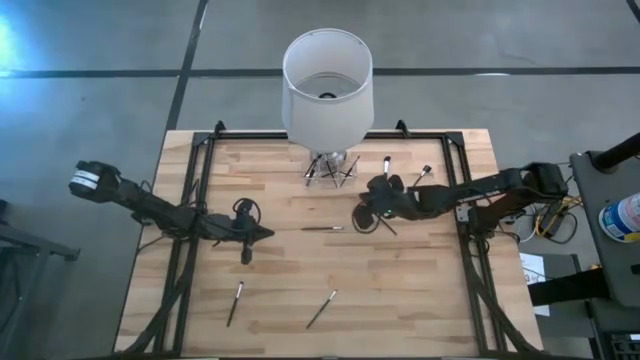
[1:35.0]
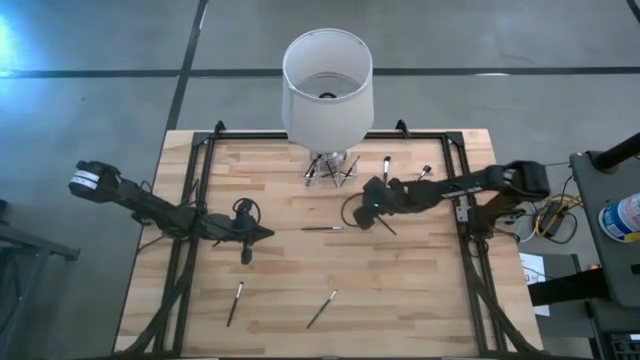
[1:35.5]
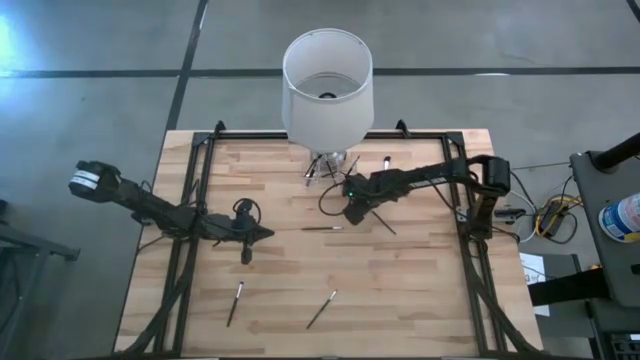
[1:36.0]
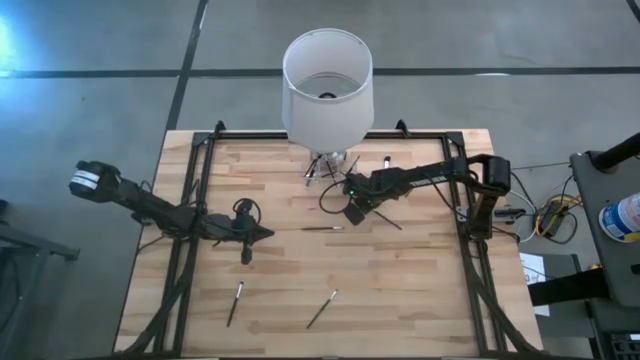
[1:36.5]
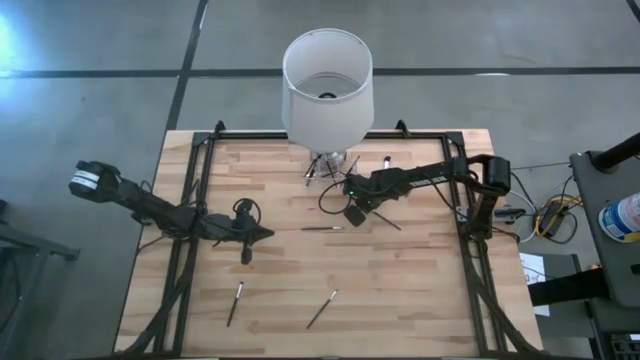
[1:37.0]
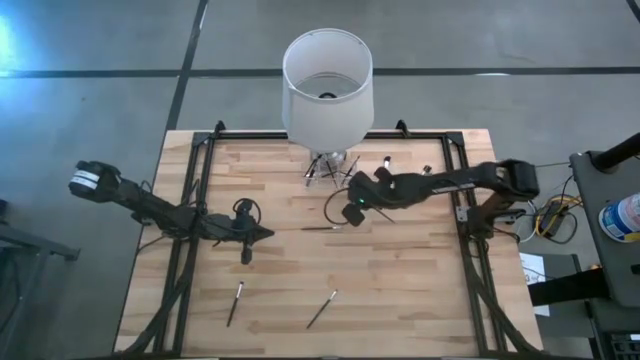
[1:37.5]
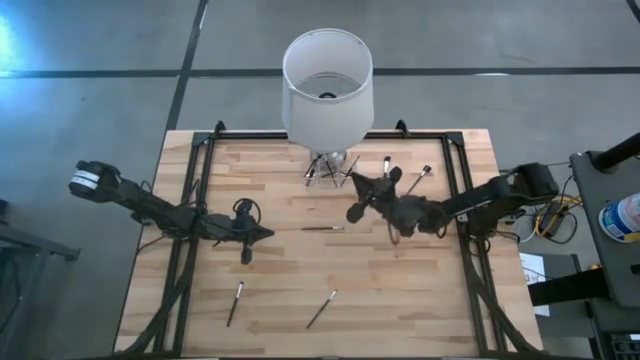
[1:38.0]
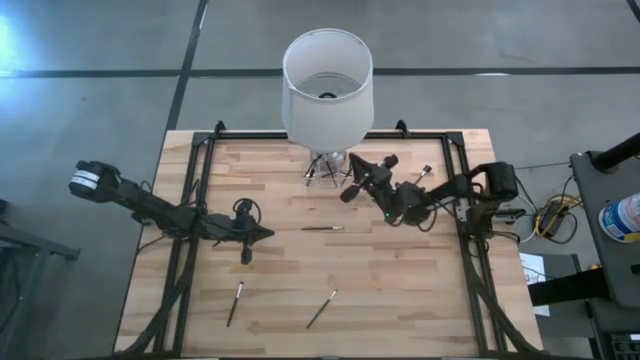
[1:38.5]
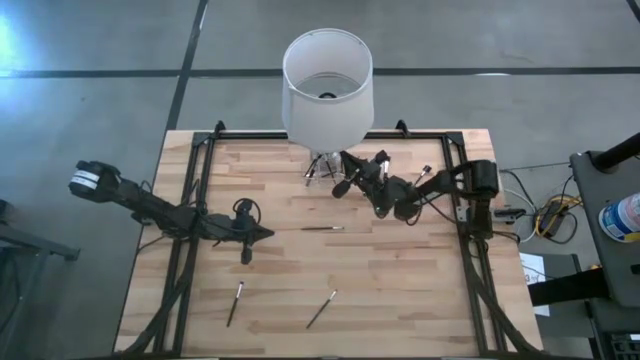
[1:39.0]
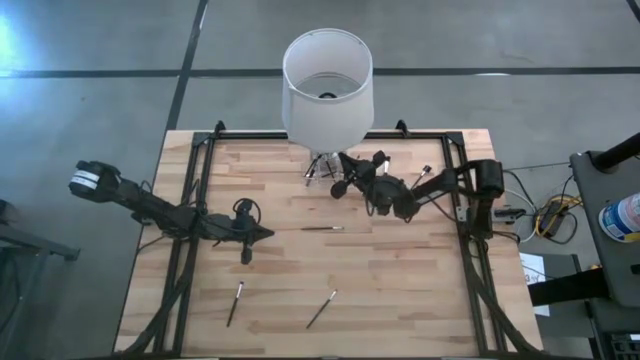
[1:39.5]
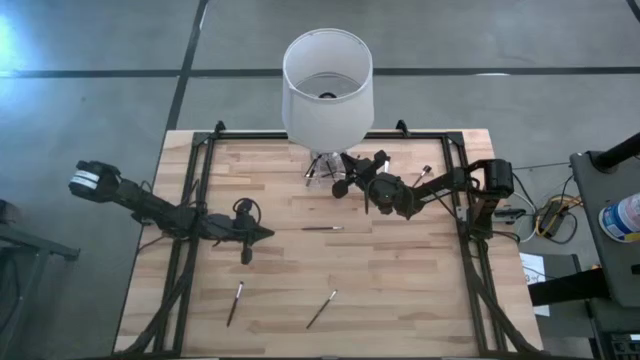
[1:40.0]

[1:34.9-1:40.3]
Task: Put items in baskets/containers
Put the black eyeshadow brush into the transparent organizer

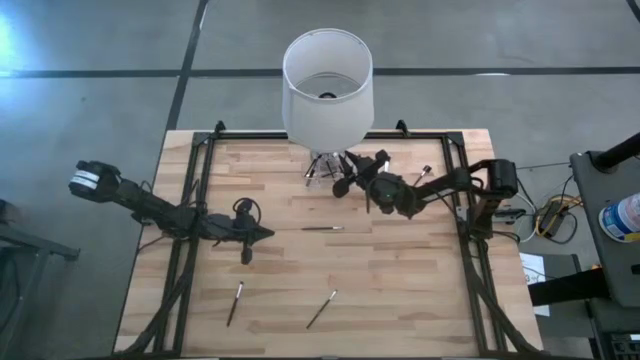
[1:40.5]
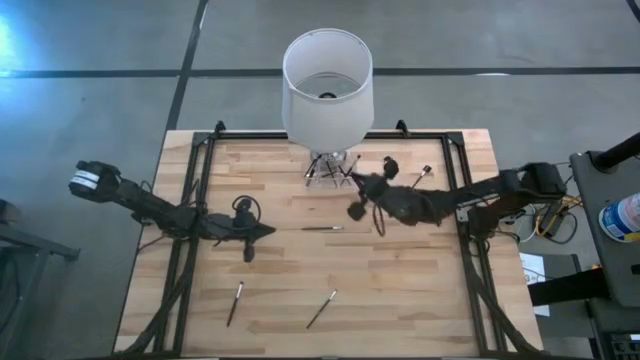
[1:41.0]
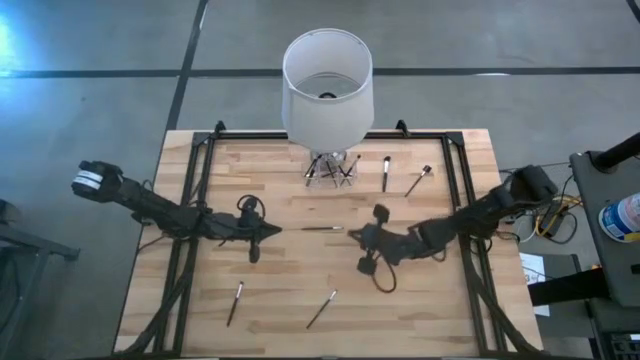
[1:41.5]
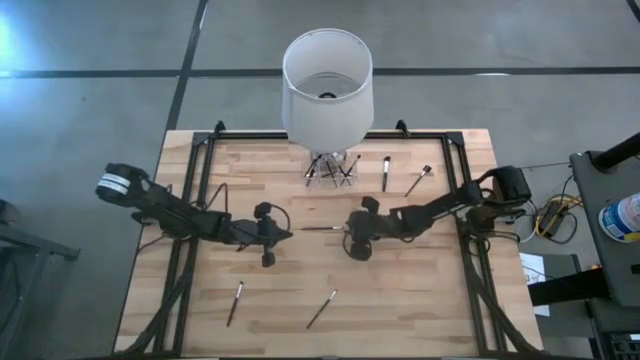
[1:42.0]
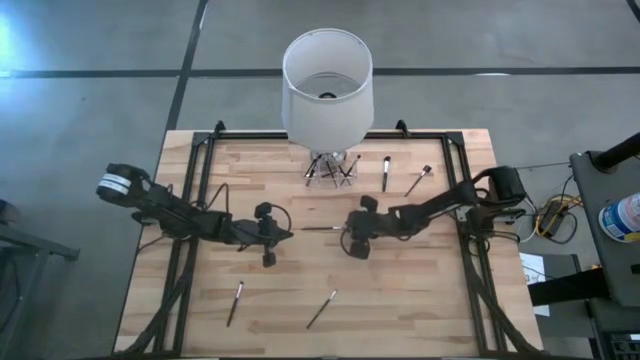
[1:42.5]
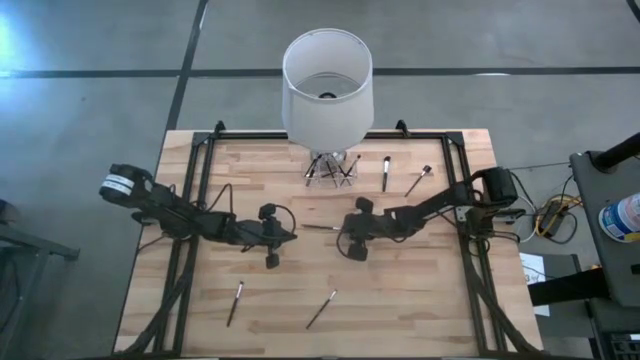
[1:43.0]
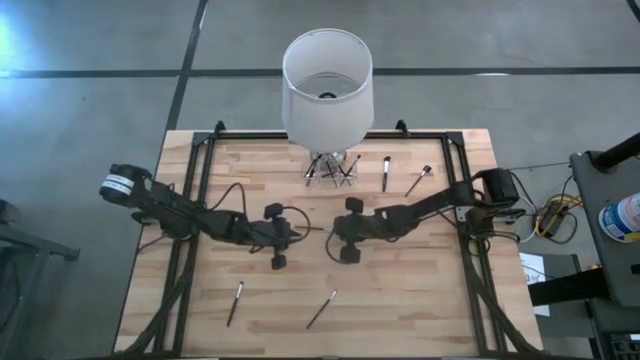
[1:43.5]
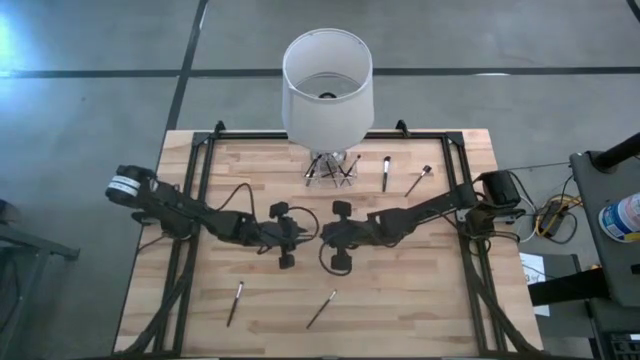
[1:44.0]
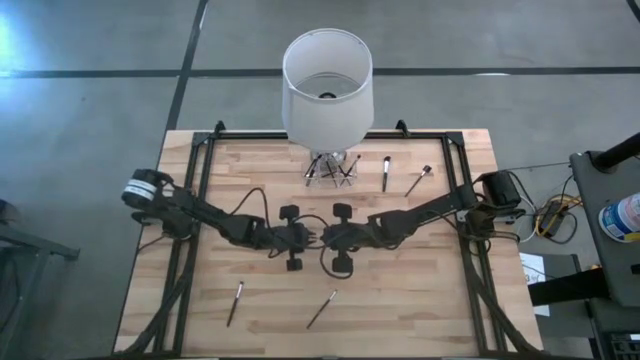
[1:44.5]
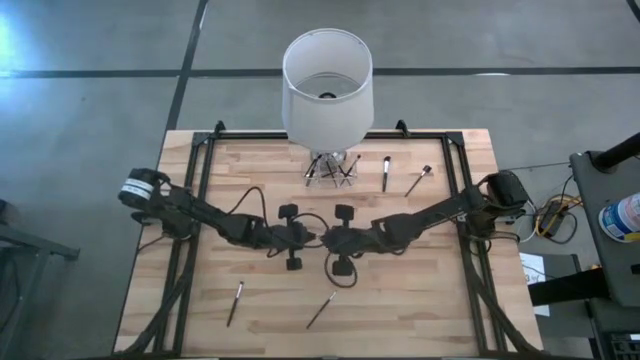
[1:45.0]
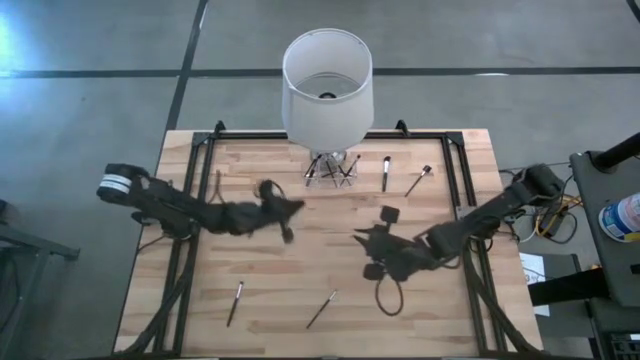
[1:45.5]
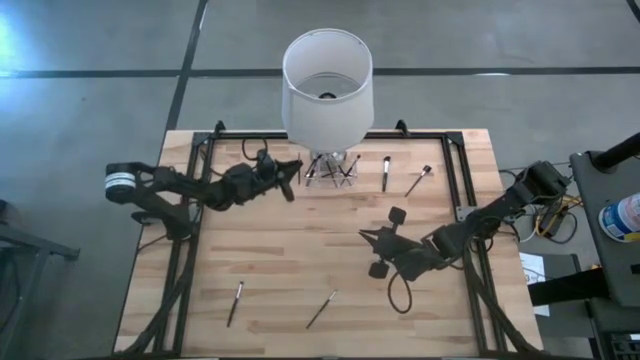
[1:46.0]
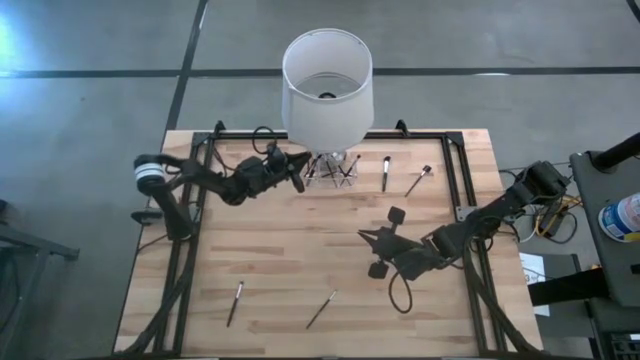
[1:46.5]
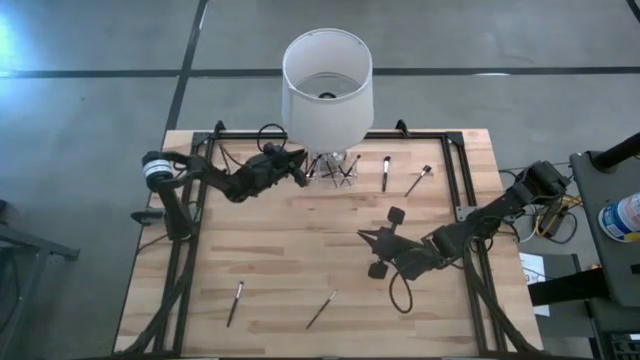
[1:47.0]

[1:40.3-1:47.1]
Put the black eyeshadow brush into the transparent organizer

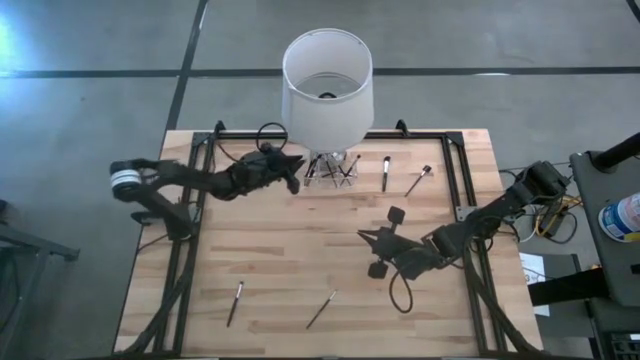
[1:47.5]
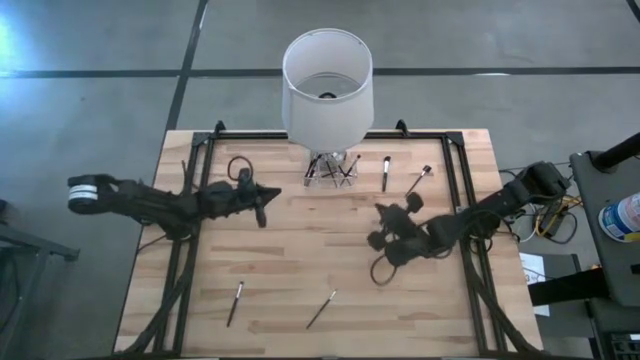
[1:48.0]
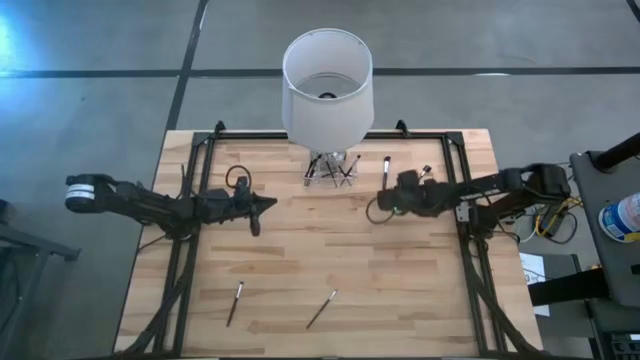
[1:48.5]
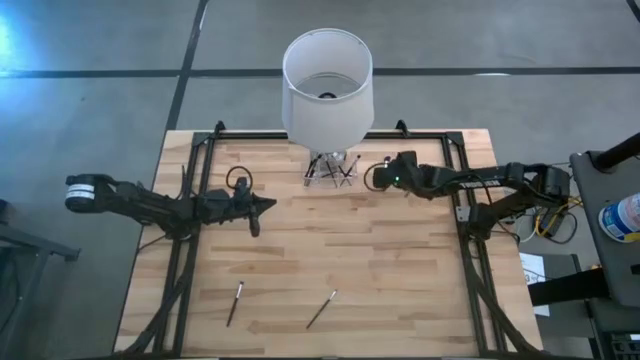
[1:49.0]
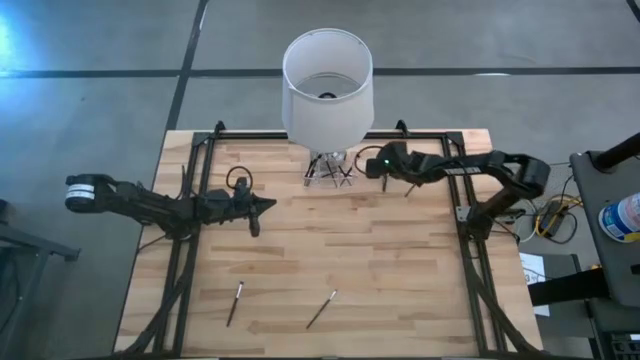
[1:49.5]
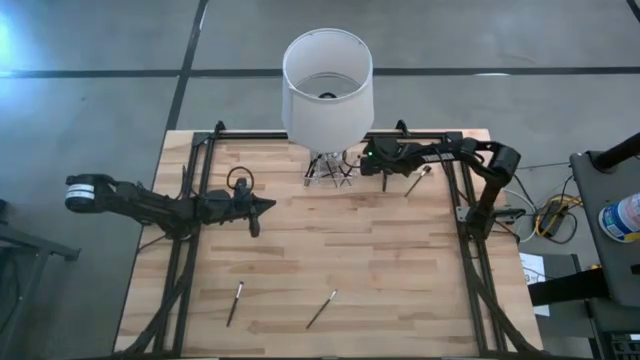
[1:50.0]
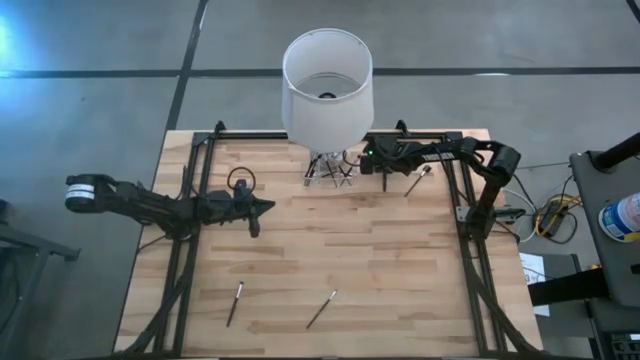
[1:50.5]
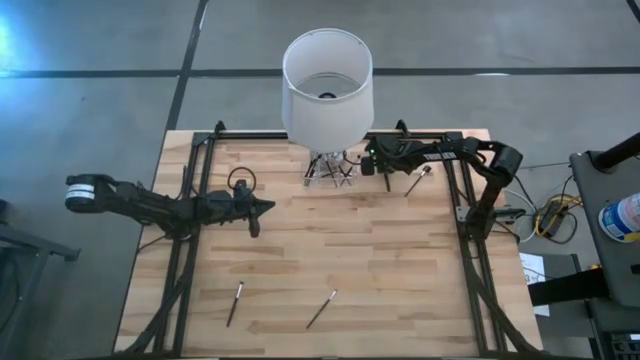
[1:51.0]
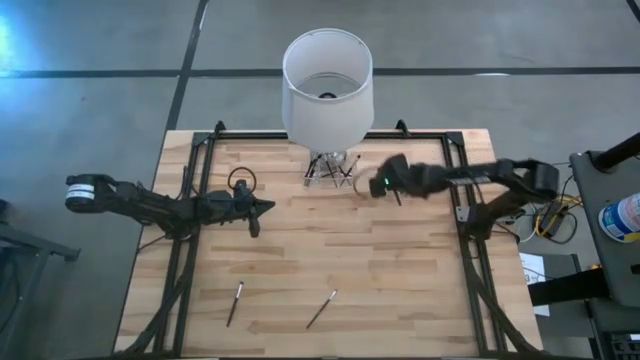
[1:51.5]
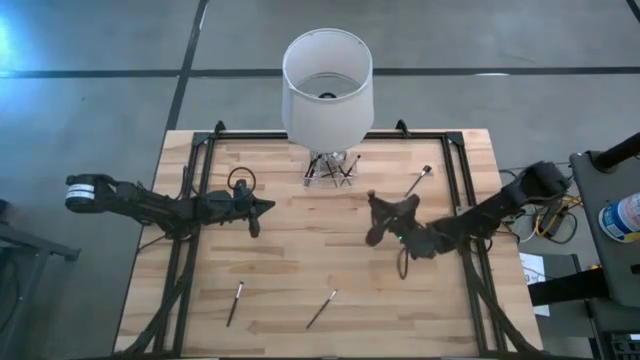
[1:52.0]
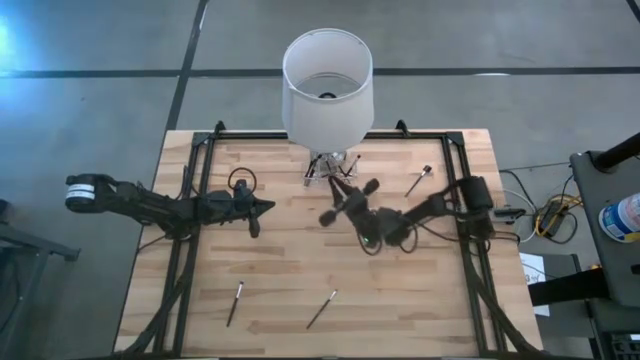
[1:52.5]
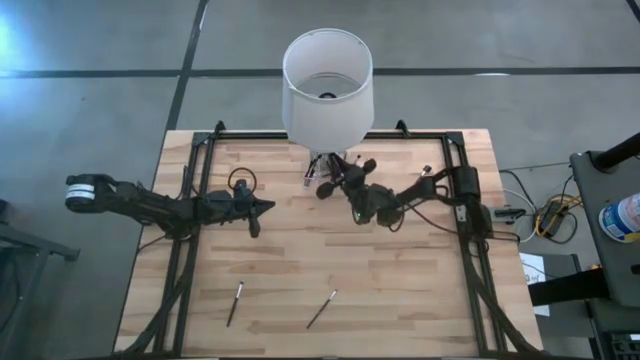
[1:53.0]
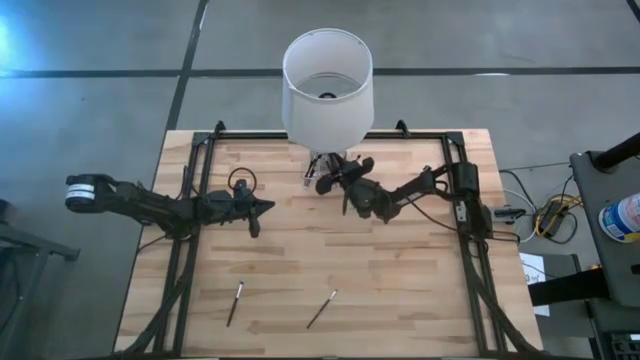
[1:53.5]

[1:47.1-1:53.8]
Put the black powder brush into the transparent organizer

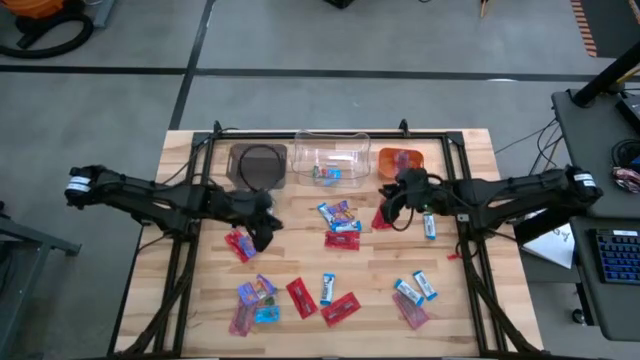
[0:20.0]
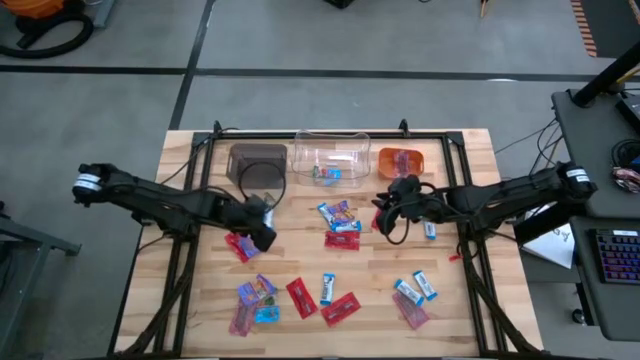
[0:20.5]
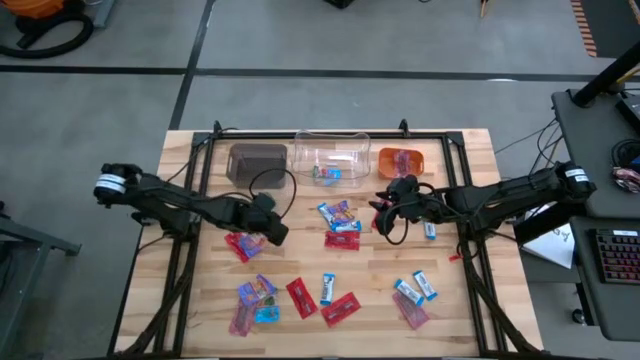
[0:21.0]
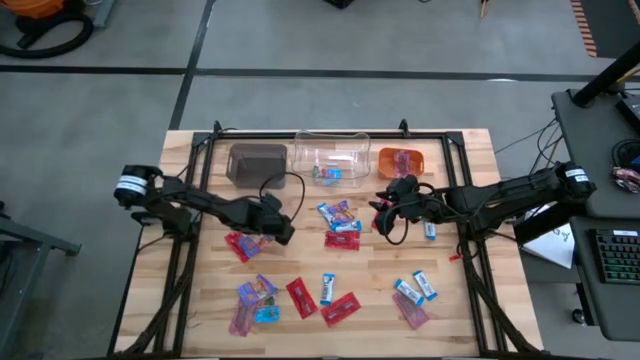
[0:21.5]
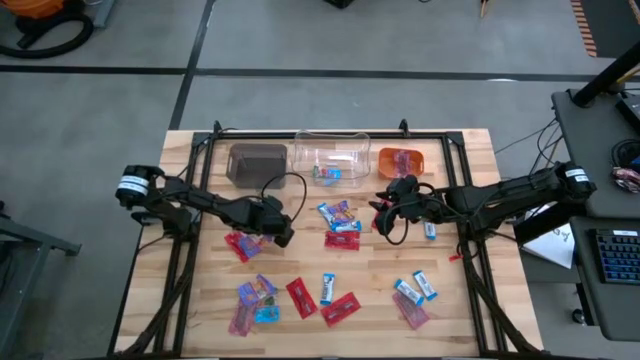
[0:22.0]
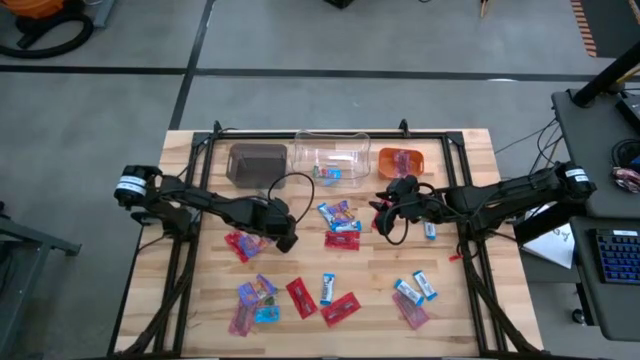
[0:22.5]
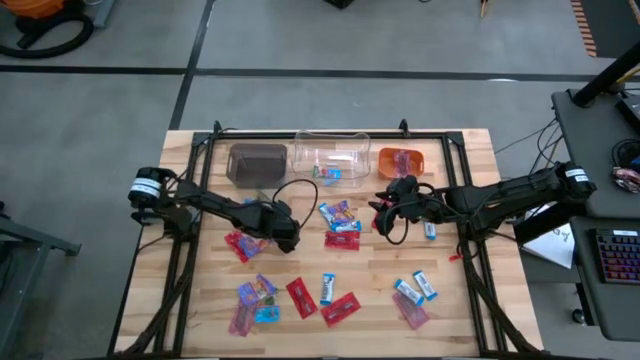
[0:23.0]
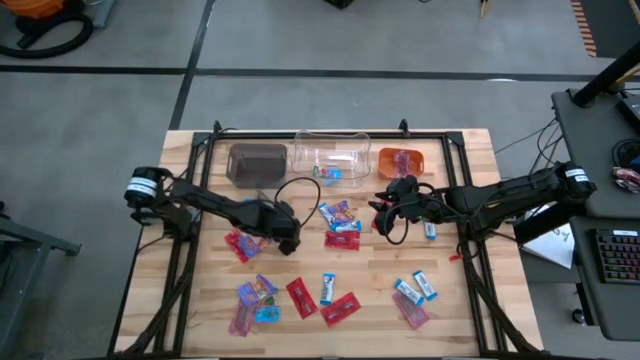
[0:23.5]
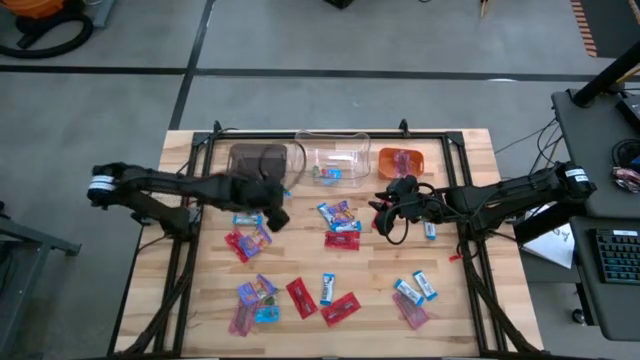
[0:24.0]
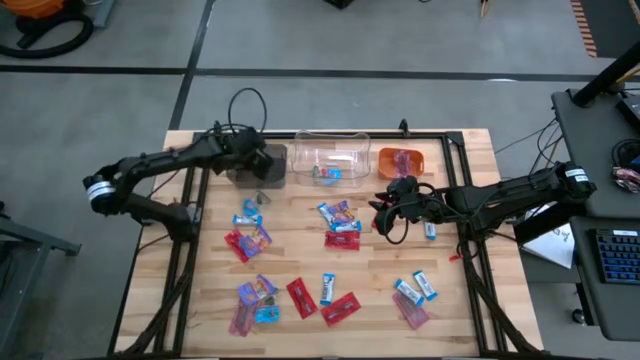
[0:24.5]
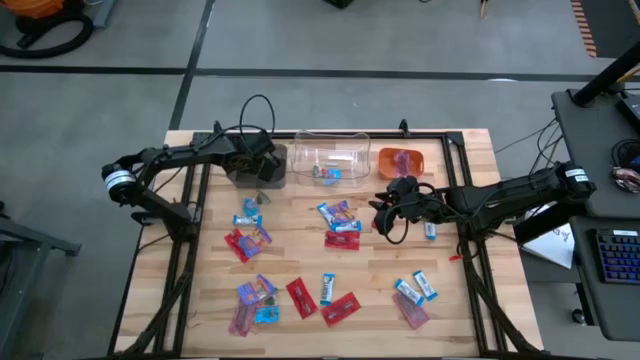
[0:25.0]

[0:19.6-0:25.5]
Task: Sort candy
Put the white candy into the black bin
